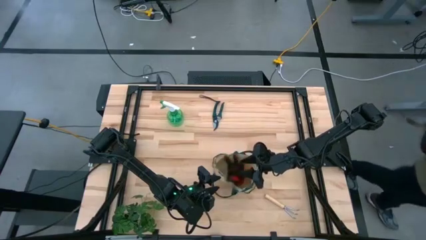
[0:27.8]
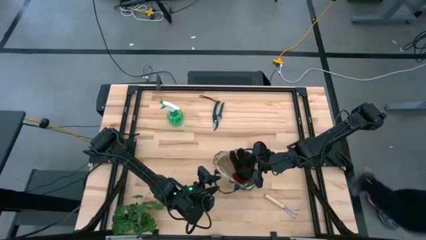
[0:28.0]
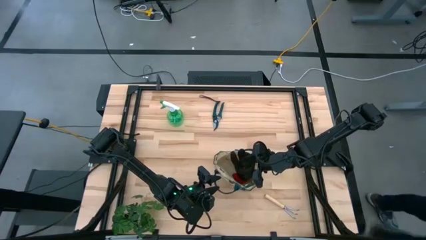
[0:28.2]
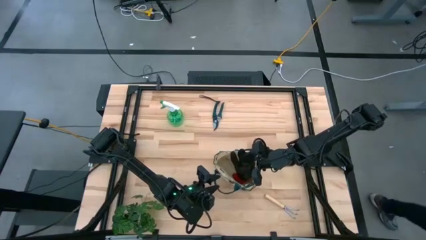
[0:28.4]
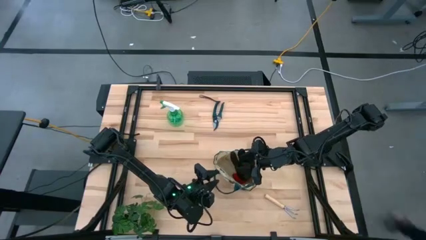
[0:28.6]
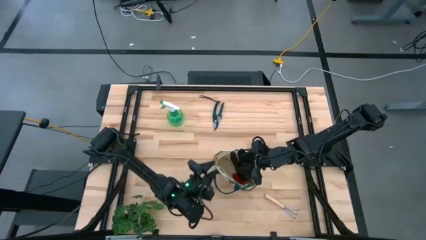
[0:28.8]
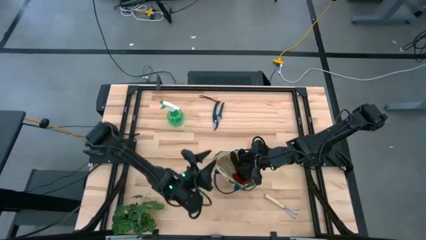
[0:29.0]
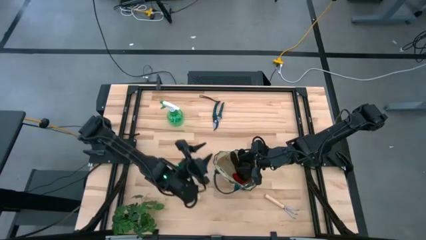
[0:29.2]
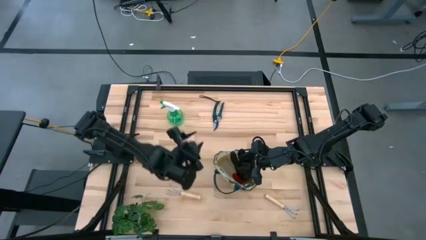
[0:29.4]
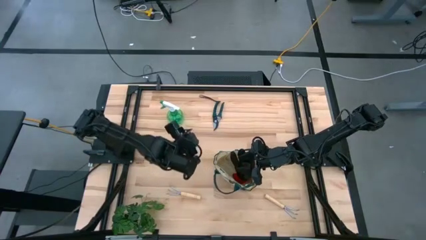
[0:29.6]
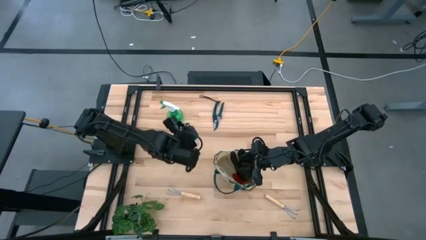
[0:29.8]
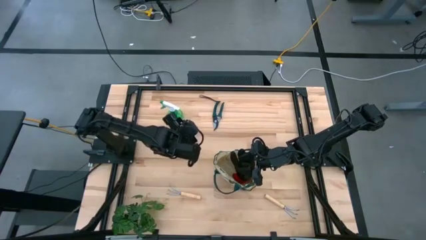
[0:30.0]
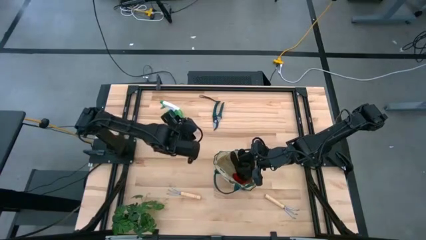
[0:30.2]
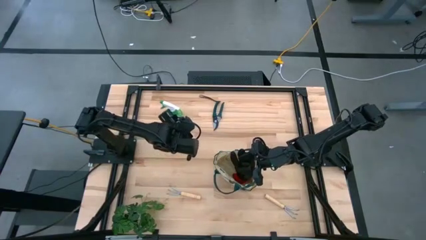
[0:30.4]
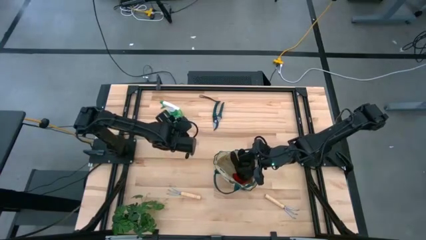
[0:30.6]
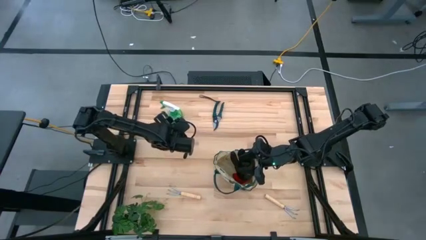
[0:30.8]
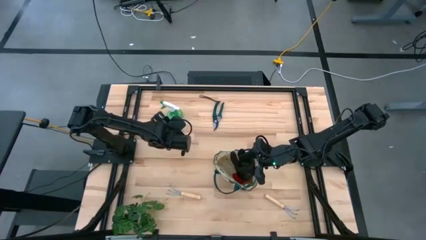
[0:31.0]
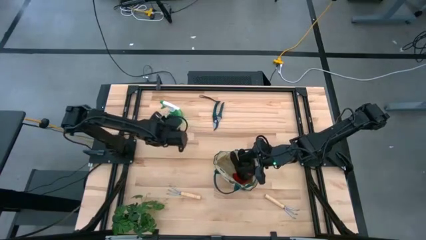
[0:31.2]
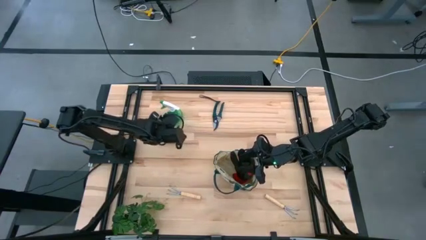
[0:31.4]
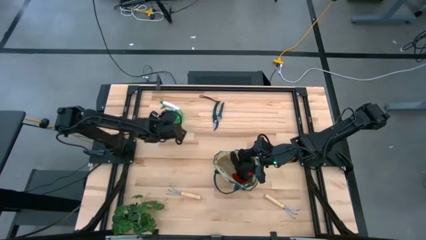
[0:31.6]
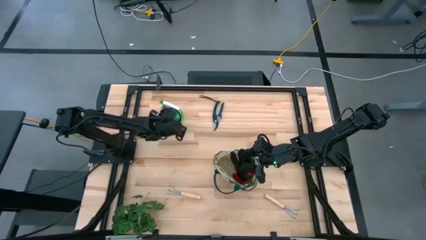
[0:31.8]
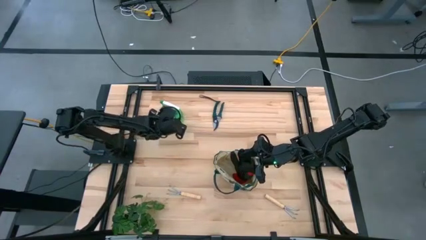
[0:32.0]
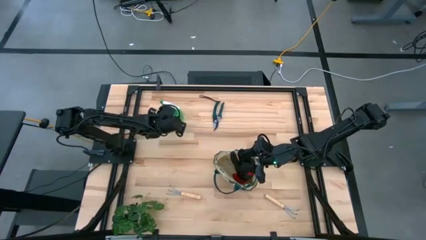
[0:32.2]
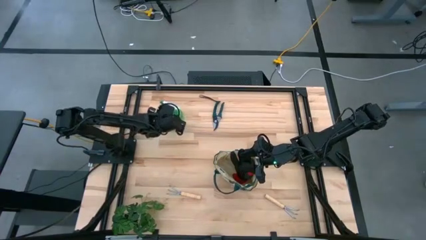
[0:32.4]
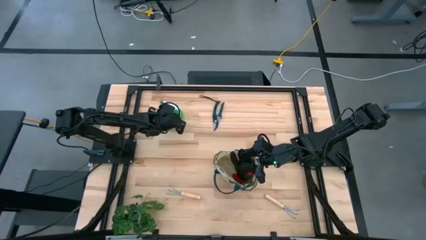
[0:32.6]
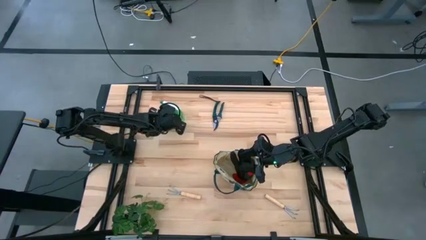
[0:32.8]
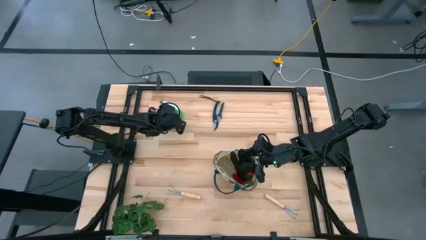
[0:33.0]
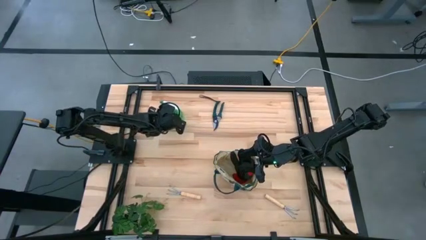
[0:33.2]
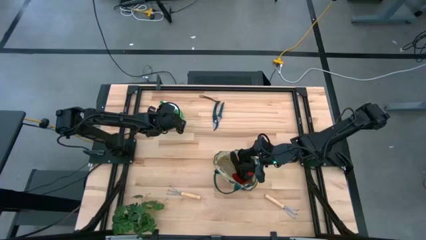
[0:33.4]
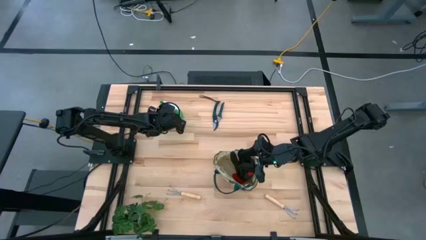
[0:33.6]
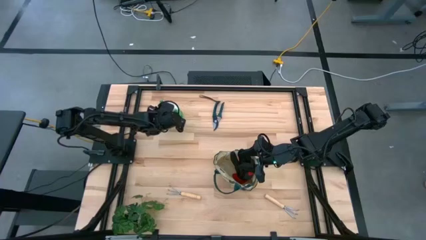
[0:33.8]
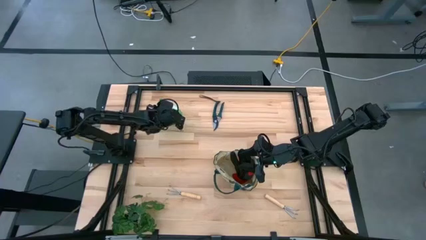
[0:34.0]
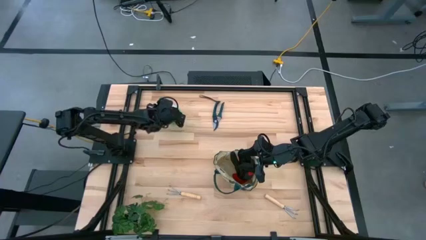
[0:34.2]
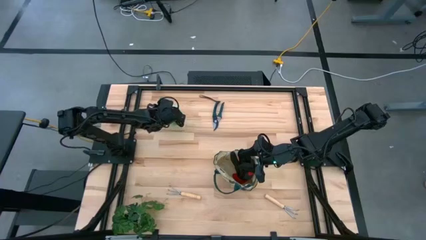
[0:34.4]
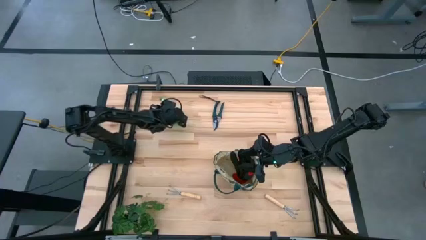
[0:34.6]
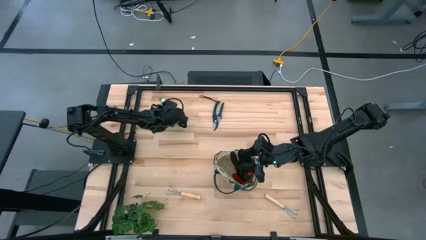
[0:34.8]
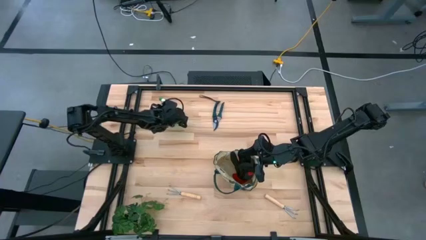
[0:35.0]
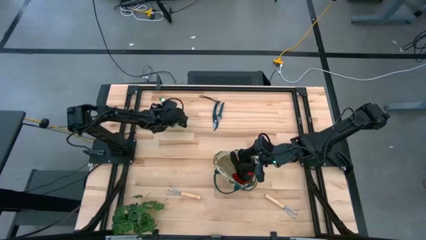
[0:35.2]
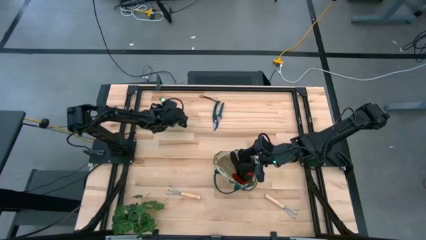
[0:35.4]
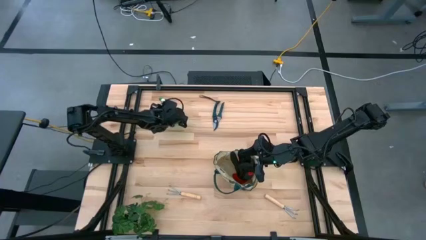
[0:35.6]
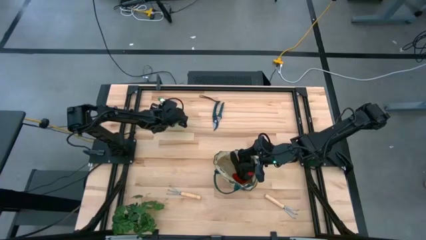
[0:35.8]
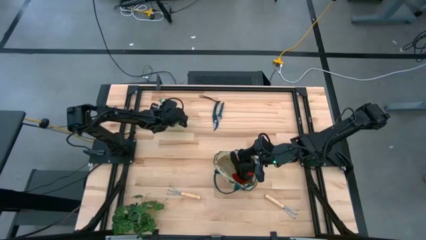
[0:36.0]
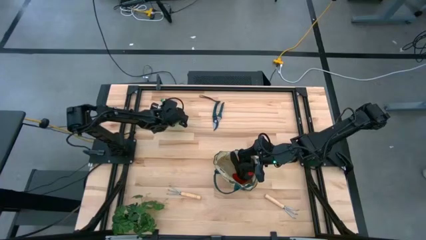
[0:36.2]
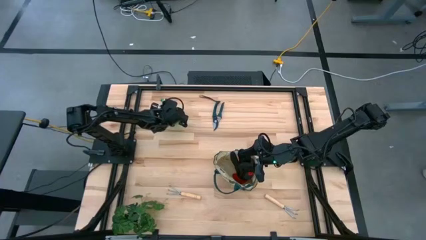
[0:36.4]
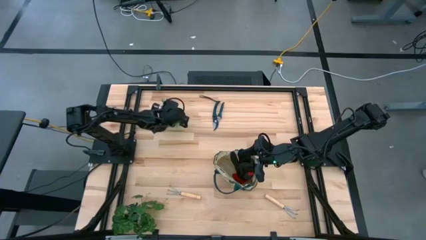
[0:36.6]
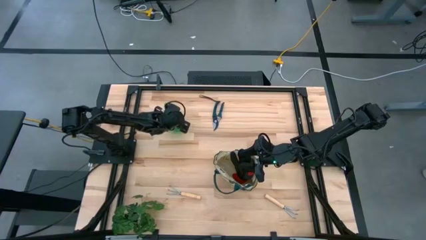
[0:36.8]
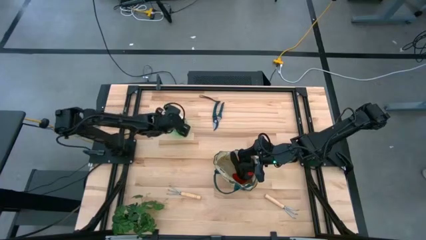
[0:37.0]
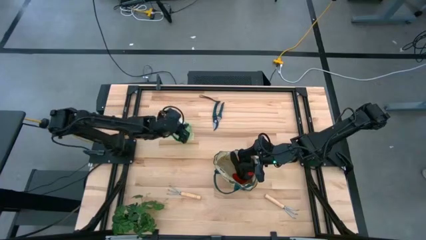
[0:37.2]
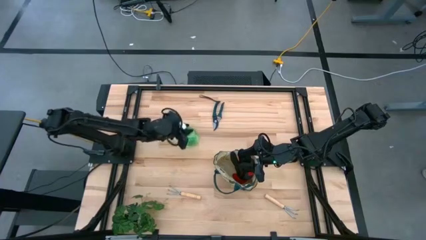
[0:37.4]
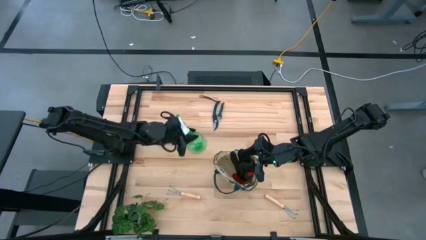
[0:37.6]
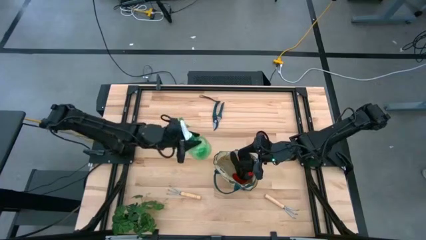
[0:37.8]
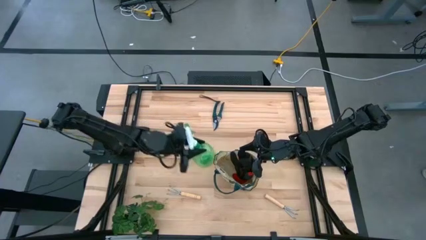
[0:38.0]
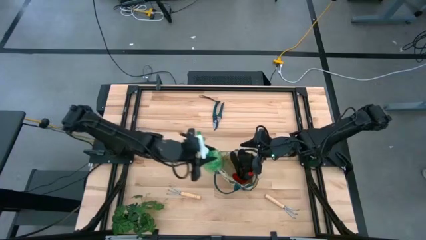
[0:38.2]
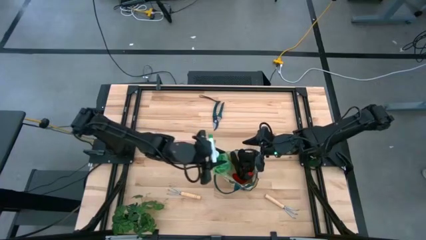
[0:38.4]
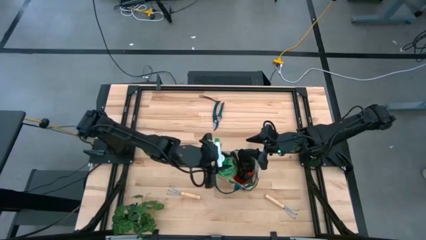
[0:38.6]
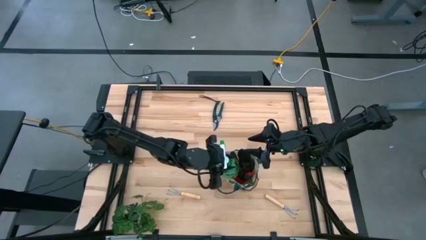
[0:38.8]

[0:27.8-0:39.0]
Task: Pick & Place Garden tools in Gardening bag
Put the green spray bottle into the green gardening bag

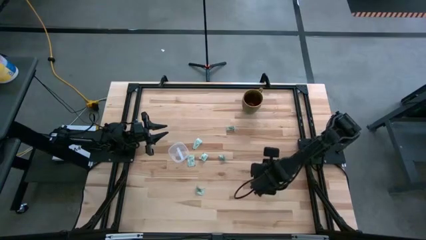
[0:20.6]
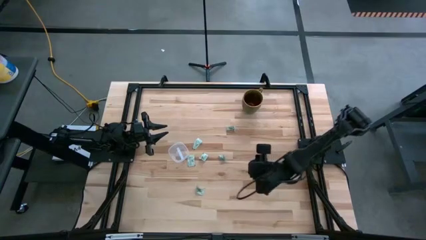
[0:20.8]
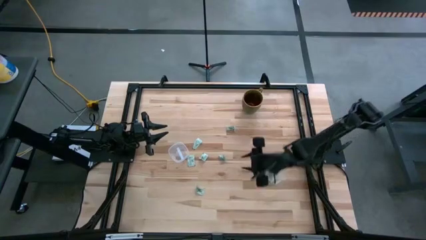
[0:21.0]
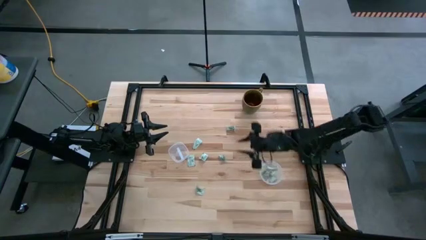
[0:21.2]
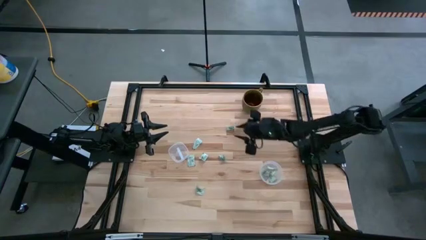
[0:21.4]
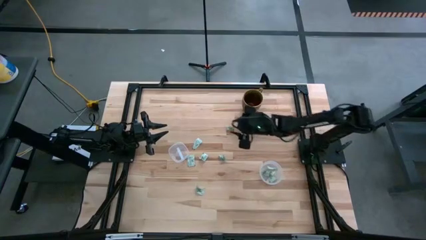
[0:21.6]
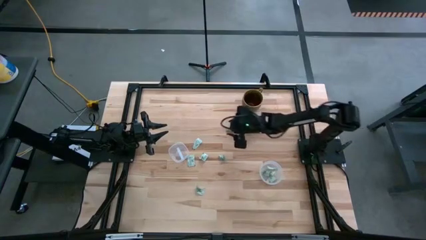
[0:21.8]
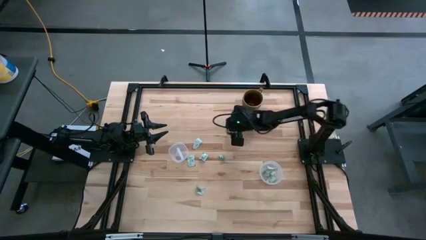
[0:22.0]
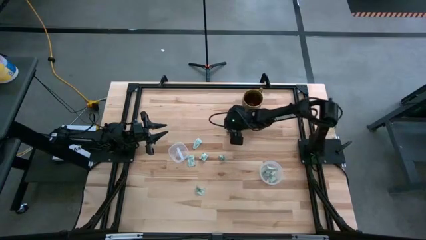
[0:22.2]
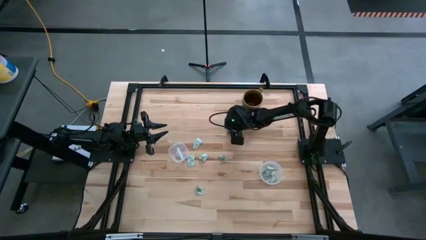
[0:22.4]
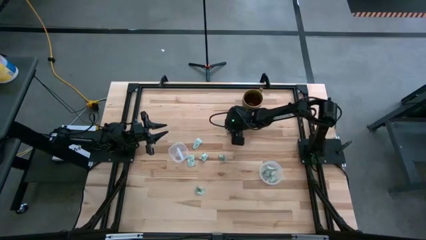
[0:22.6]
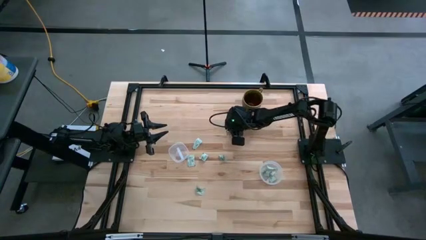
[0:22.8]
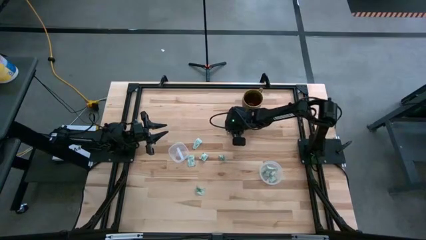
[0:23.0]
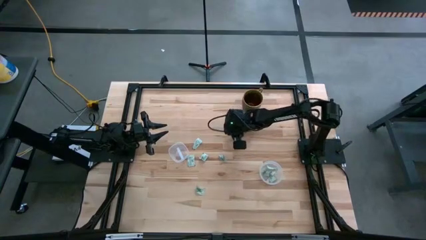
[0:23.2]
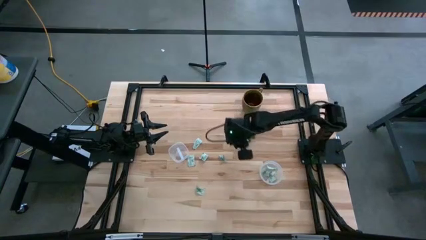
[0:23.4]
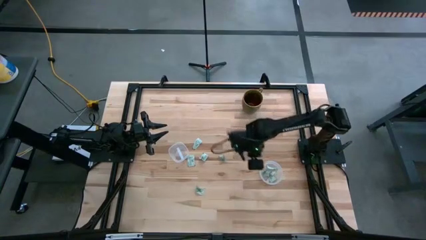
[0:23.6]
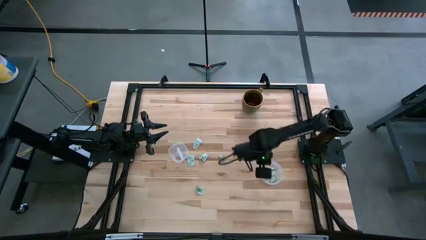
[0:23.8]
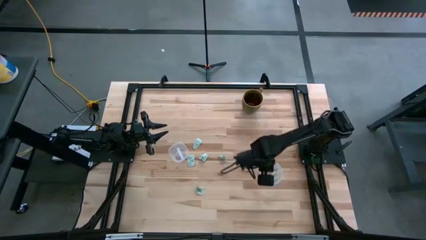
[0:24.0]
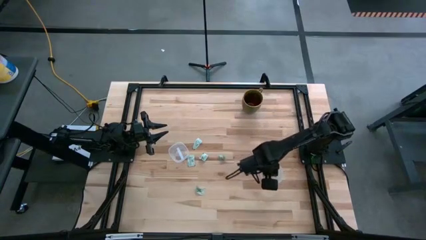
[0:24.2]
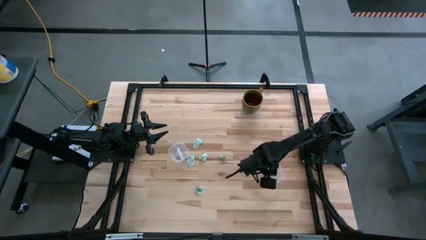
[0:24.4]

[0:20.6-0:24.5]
Task: Pick and place Stevia / Truvia into bins
Put the stevia packet into the round transparent container
